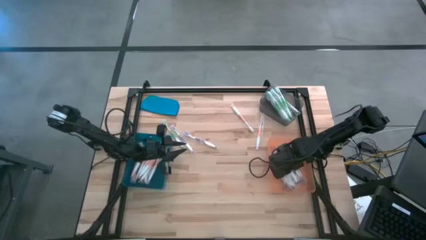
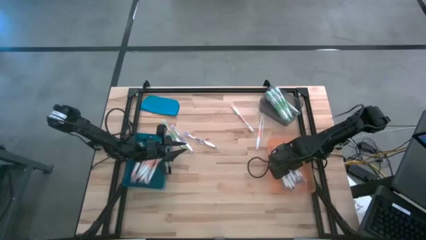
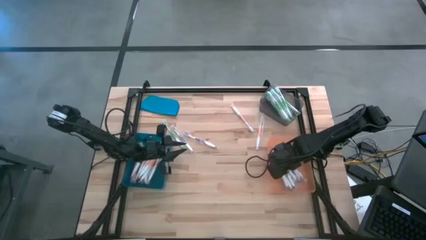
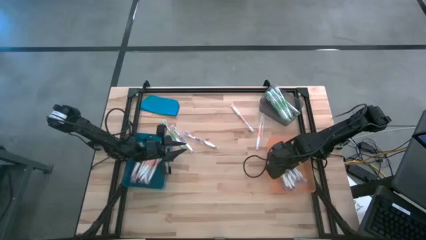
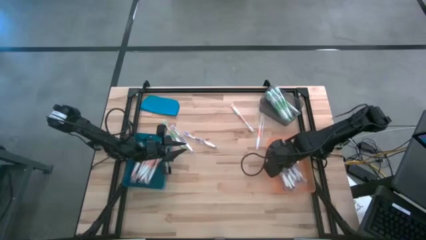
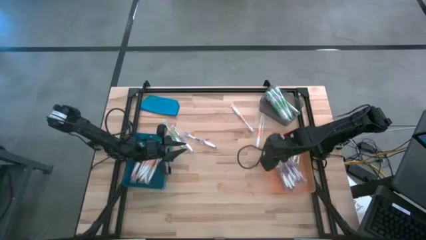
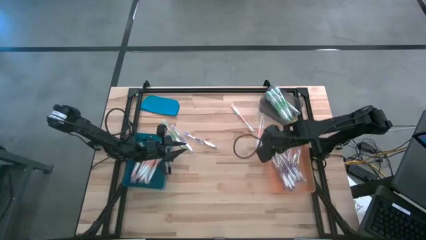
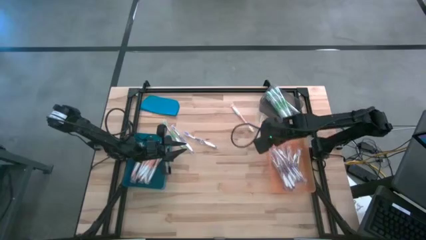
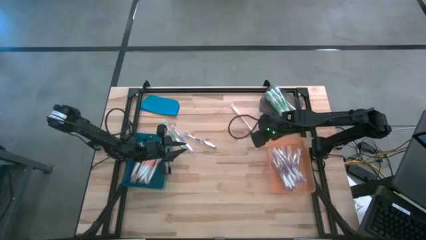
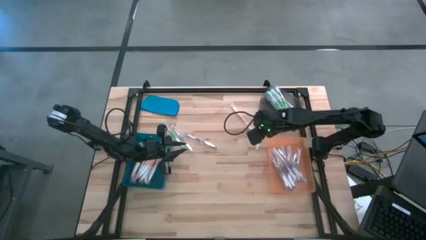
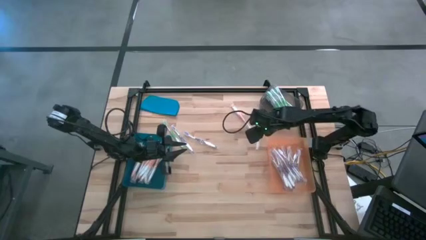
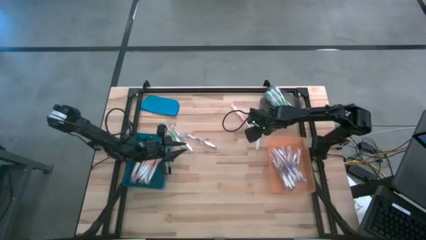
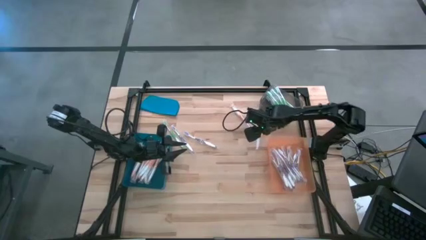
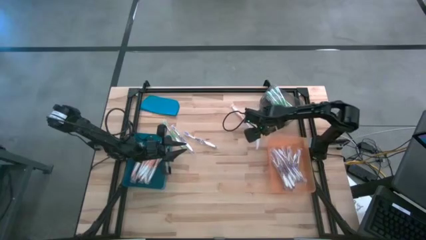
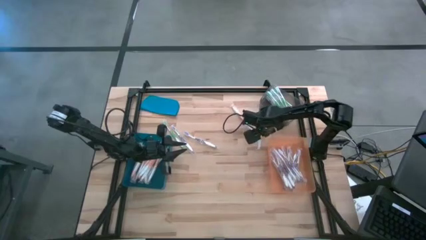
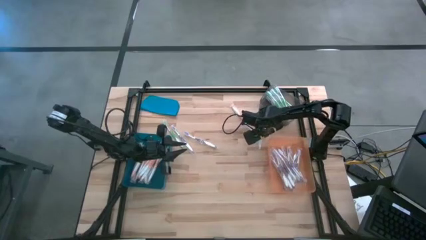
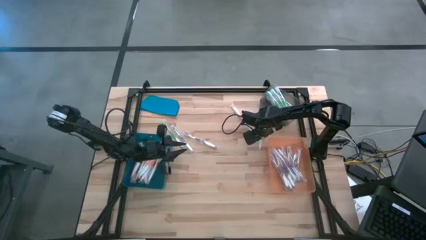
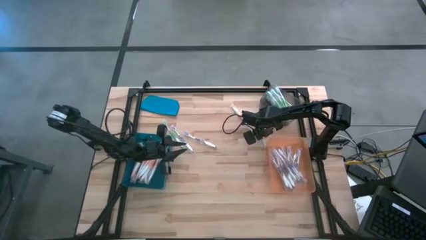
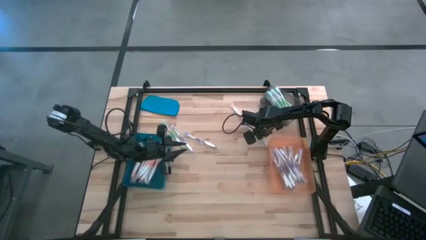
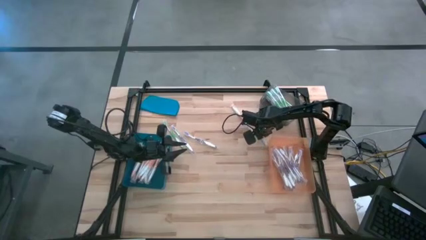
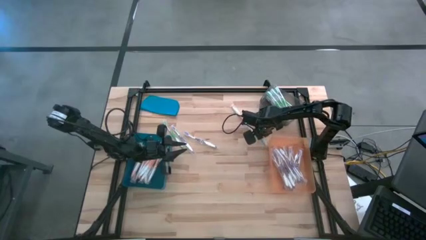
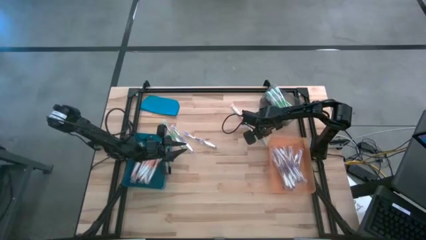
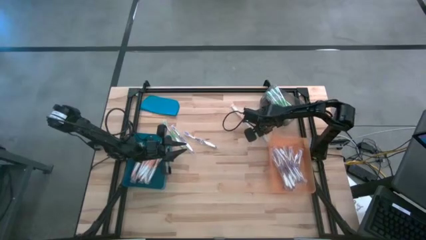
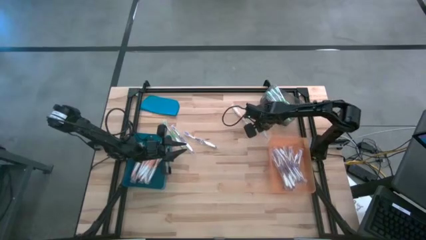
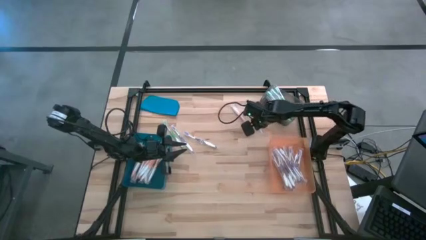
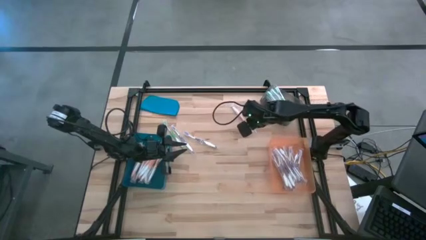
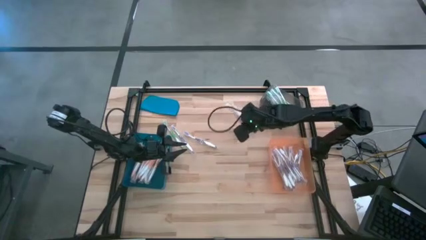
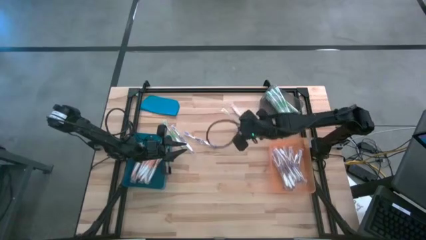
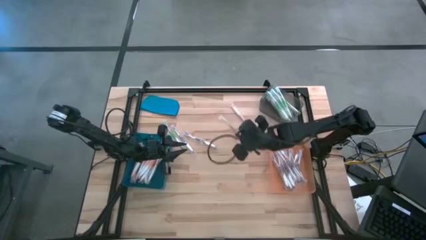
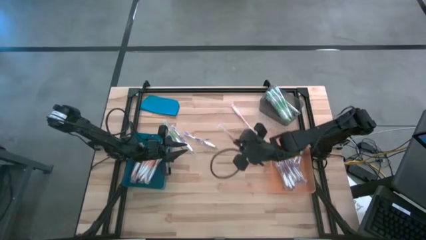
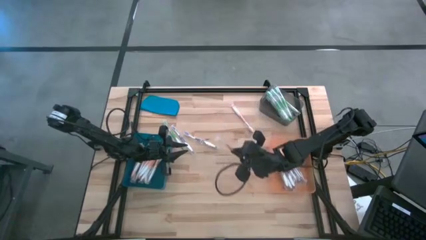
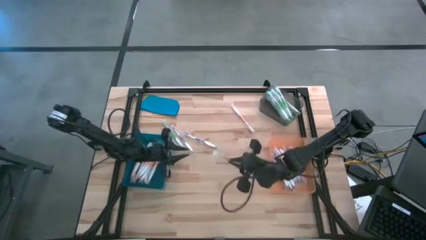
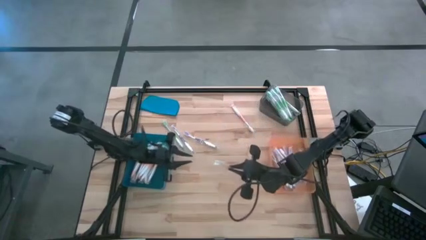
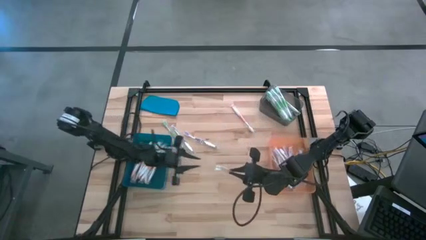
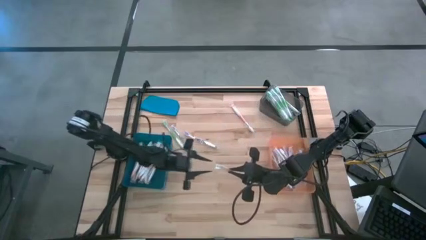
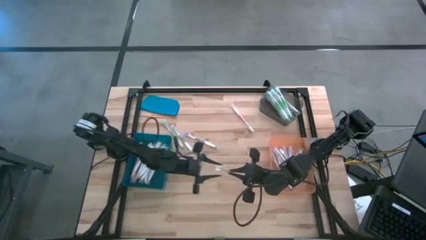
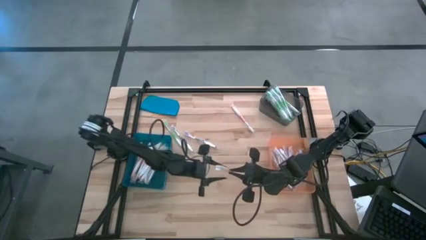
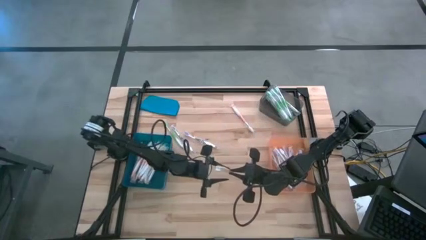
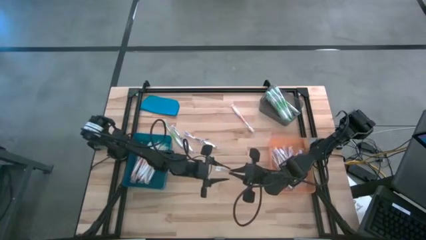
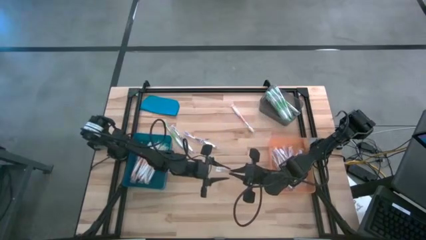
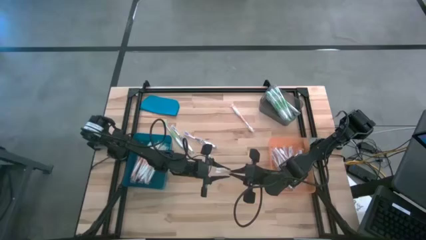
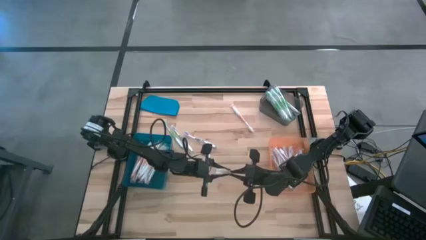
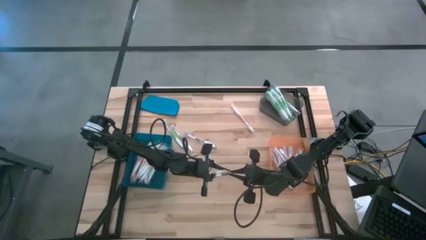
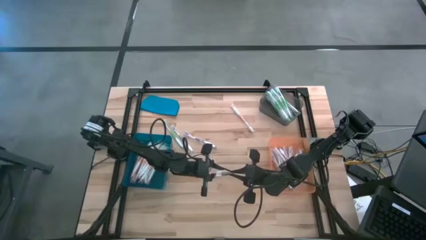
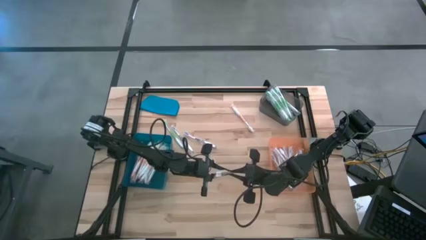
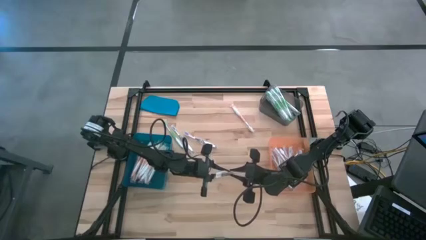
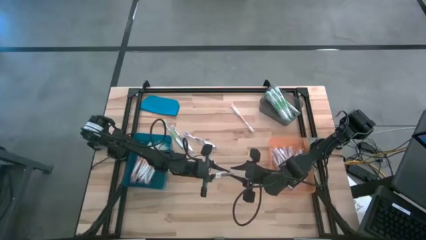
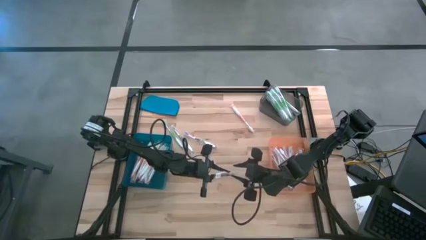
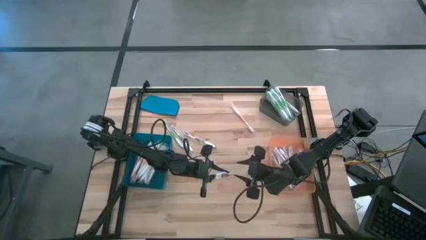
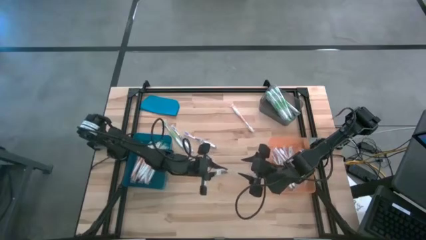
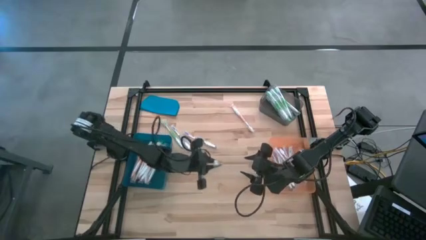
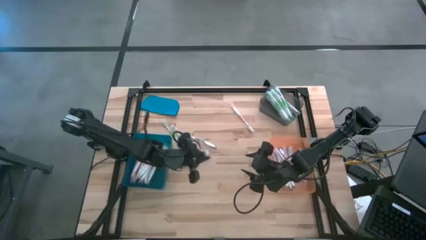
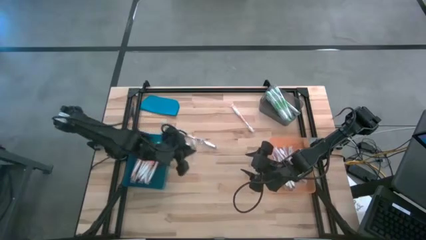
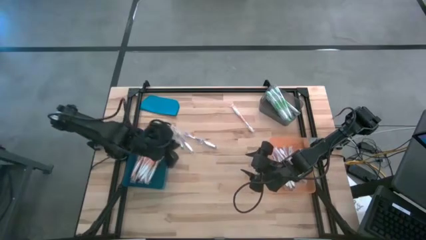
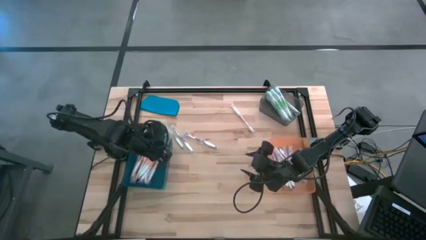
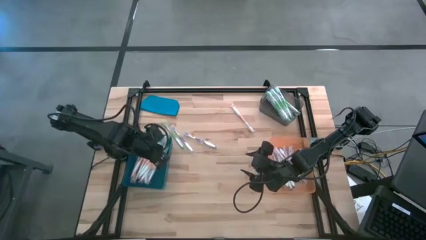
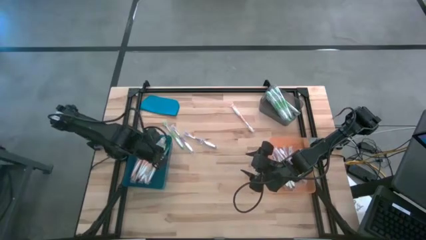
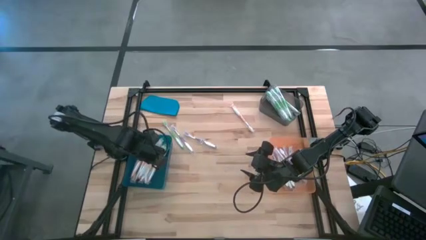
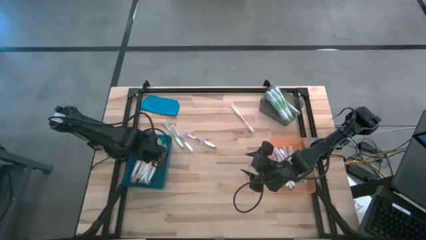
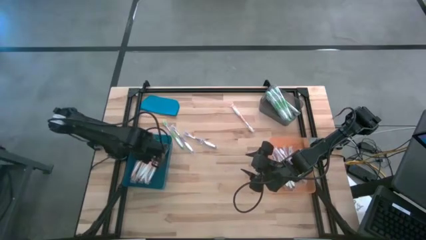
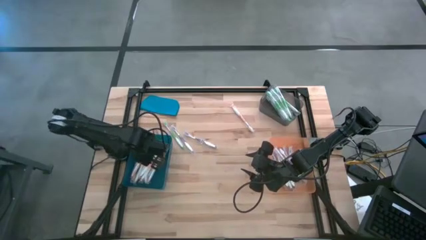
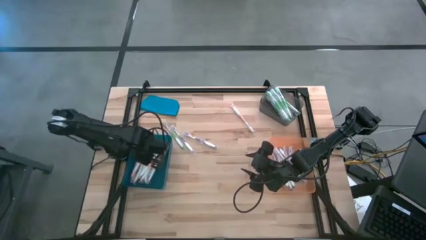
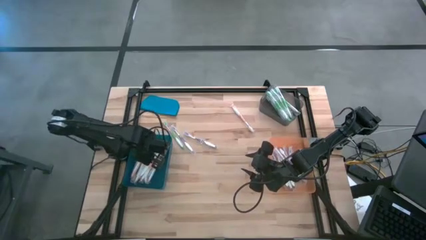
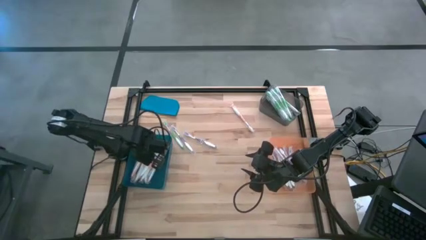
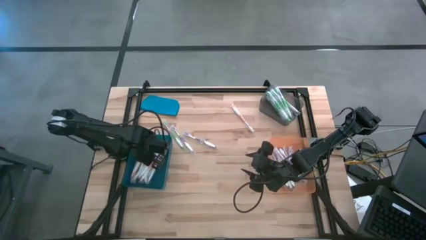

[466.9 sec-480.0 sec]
Task: Pick & Place Toothbrushes
Put the orange toothbrush into the blue bin
